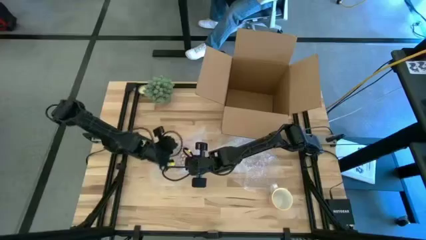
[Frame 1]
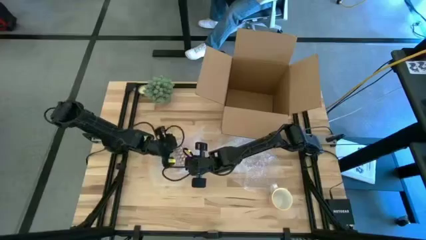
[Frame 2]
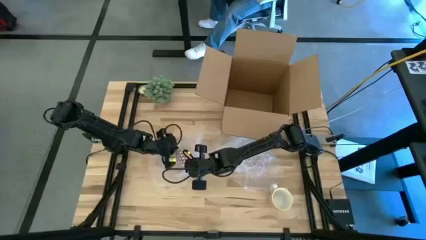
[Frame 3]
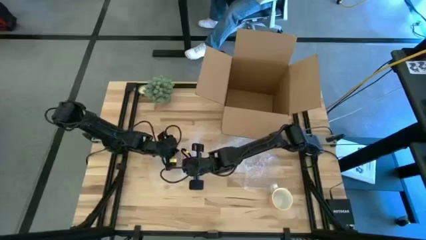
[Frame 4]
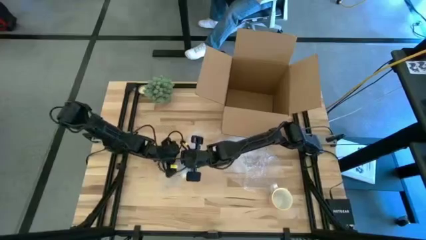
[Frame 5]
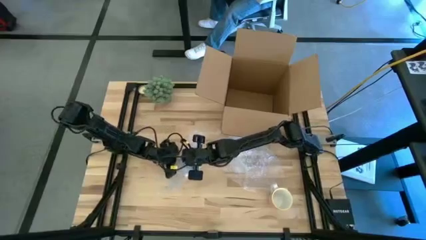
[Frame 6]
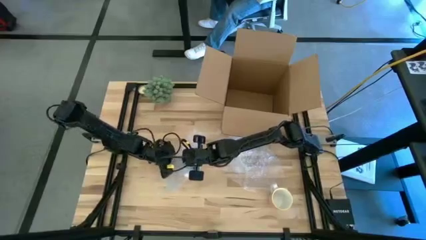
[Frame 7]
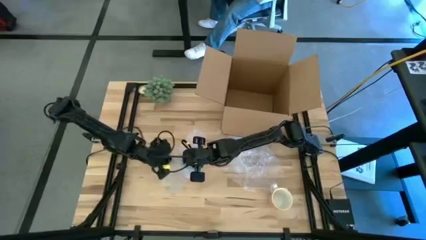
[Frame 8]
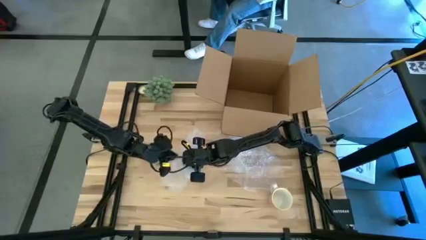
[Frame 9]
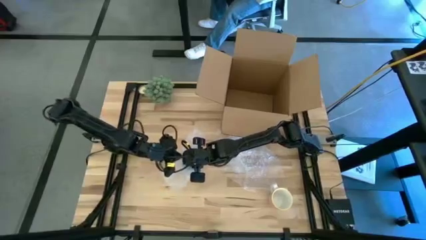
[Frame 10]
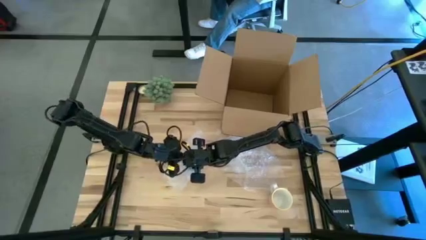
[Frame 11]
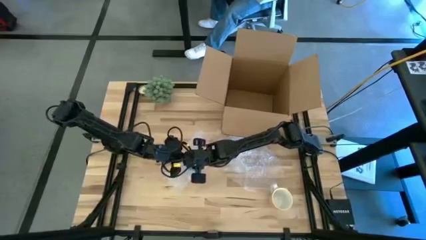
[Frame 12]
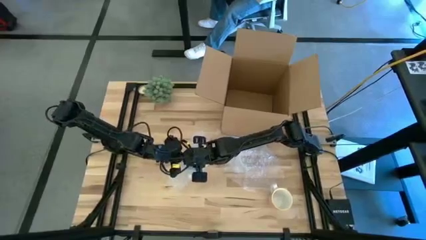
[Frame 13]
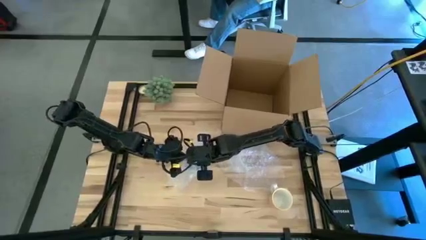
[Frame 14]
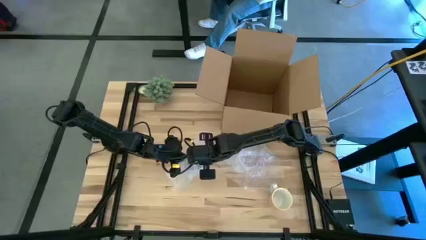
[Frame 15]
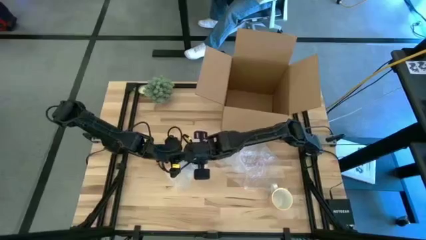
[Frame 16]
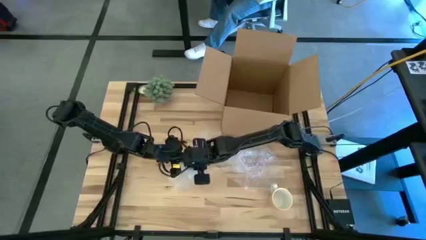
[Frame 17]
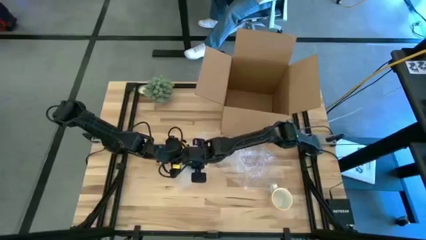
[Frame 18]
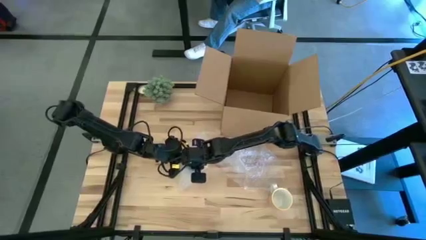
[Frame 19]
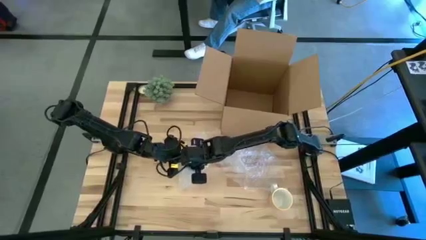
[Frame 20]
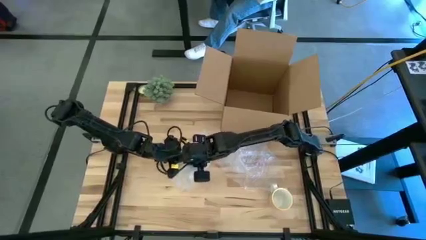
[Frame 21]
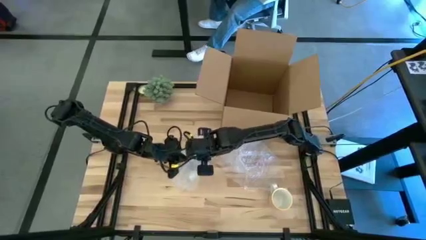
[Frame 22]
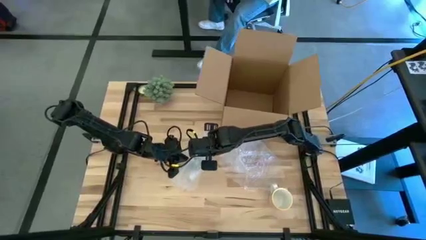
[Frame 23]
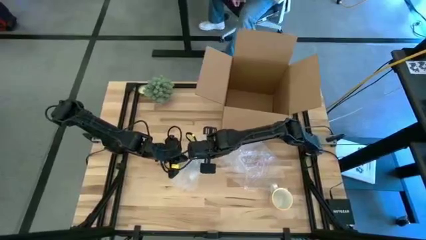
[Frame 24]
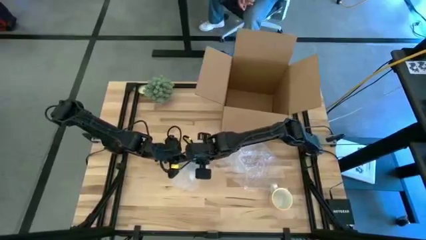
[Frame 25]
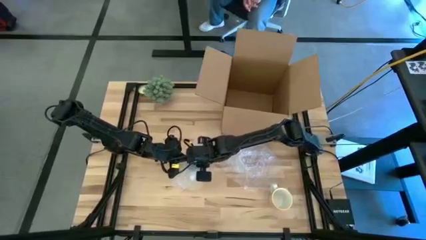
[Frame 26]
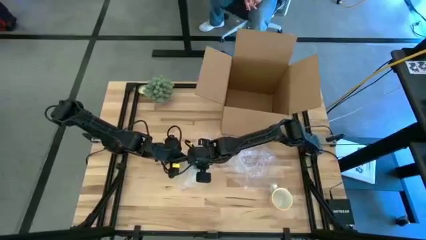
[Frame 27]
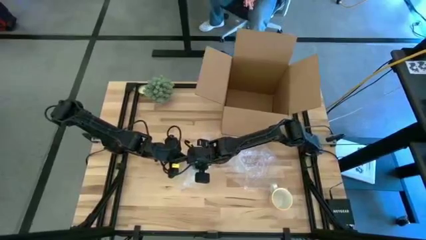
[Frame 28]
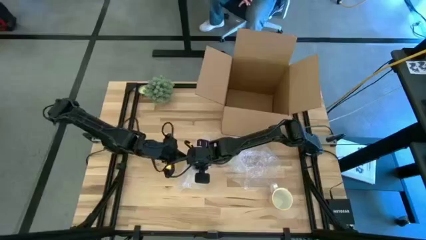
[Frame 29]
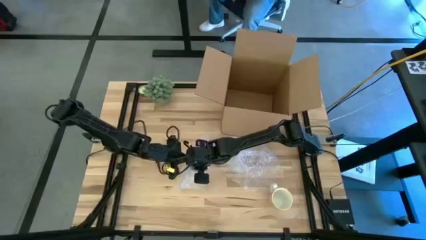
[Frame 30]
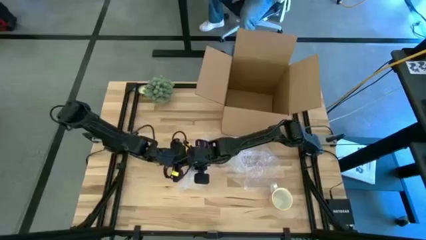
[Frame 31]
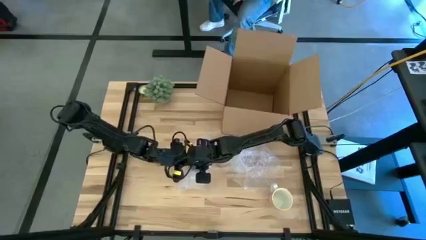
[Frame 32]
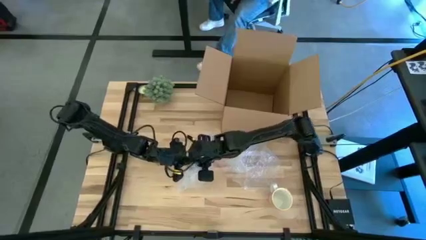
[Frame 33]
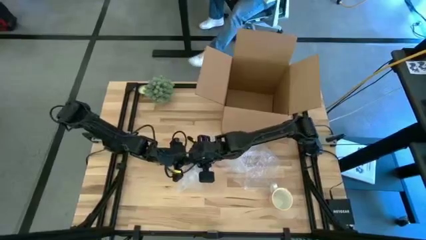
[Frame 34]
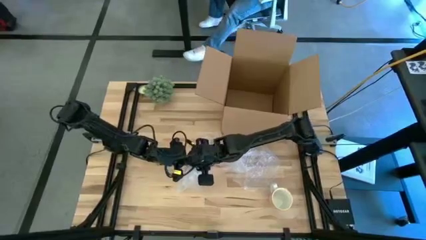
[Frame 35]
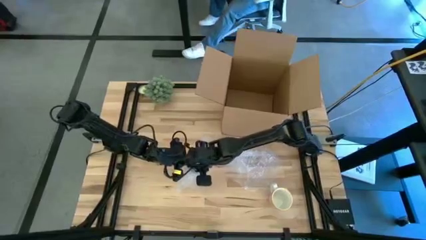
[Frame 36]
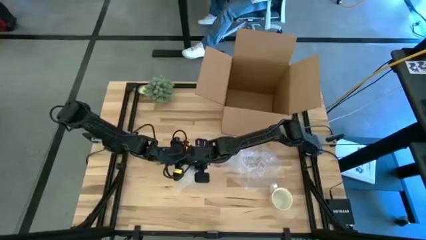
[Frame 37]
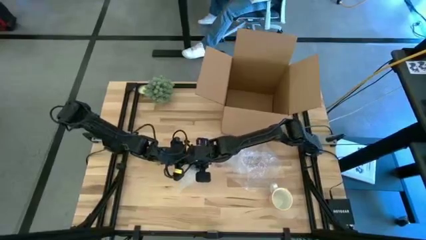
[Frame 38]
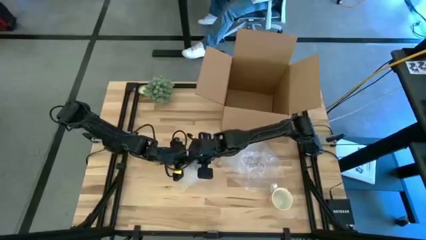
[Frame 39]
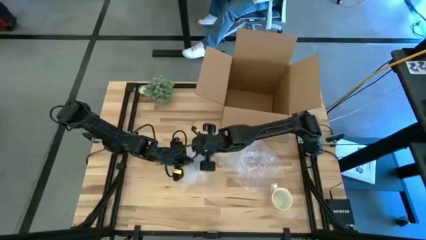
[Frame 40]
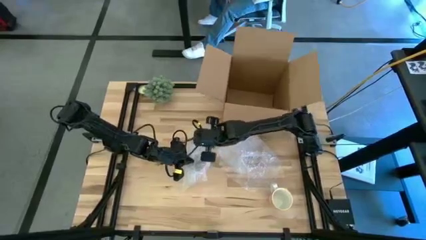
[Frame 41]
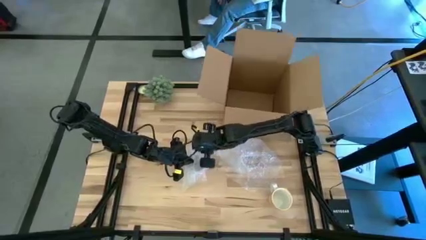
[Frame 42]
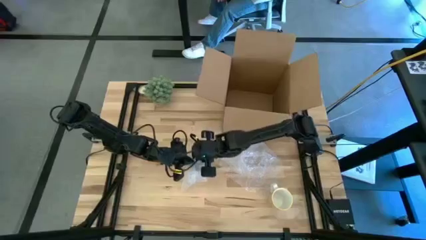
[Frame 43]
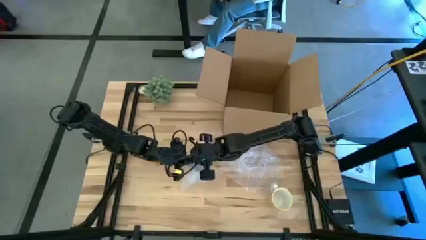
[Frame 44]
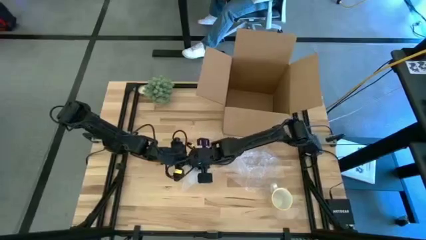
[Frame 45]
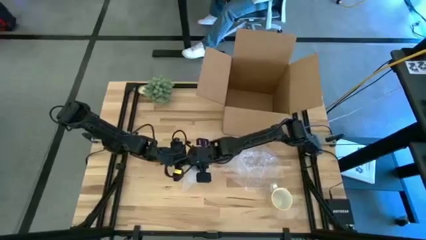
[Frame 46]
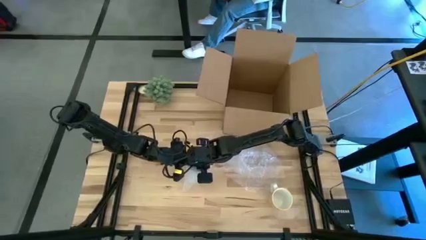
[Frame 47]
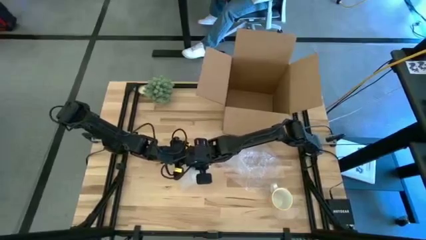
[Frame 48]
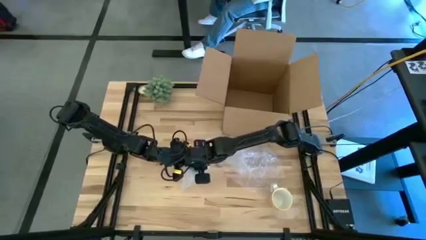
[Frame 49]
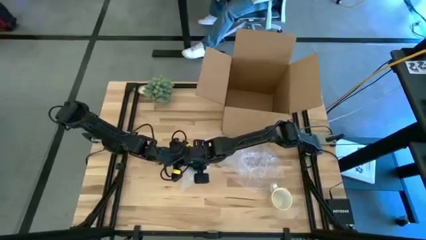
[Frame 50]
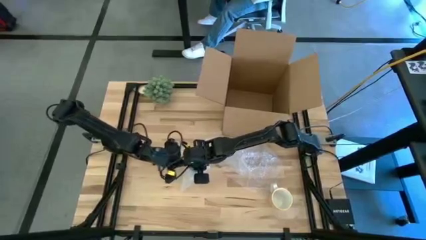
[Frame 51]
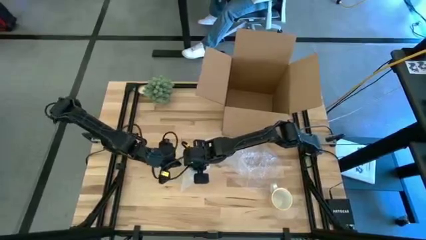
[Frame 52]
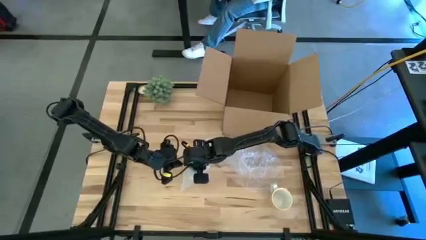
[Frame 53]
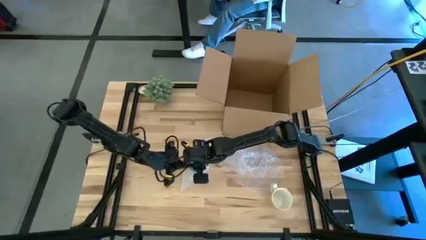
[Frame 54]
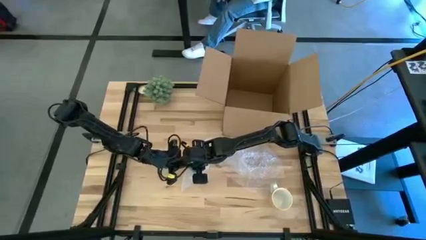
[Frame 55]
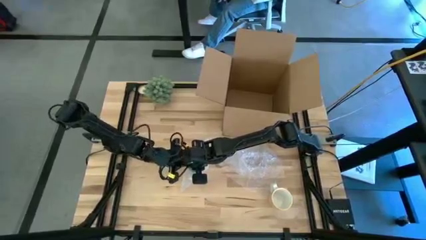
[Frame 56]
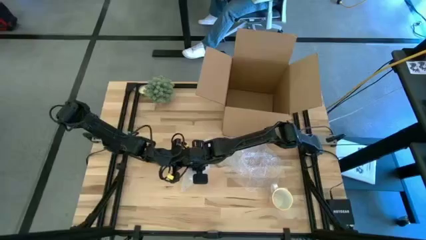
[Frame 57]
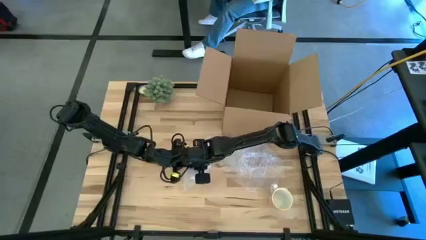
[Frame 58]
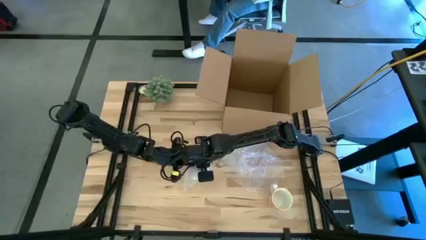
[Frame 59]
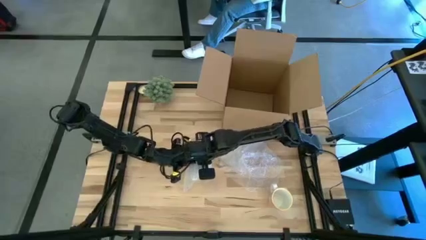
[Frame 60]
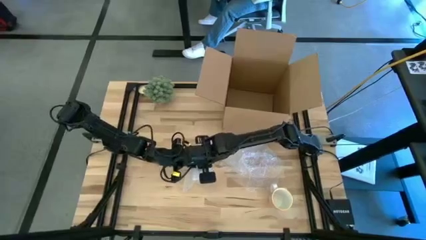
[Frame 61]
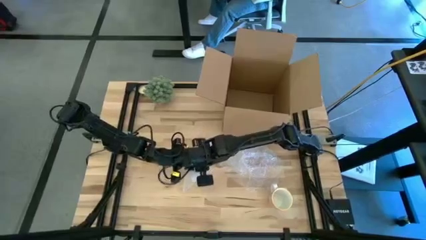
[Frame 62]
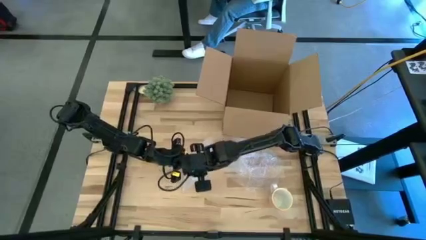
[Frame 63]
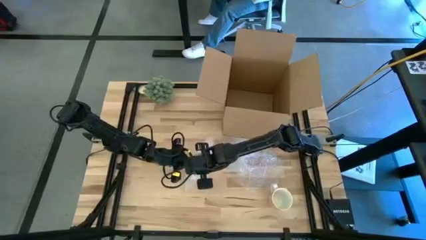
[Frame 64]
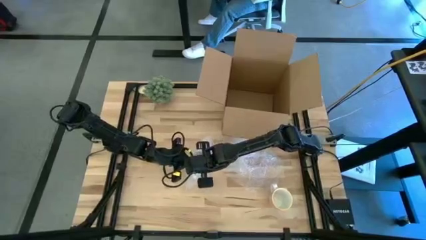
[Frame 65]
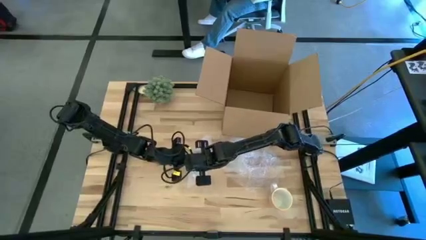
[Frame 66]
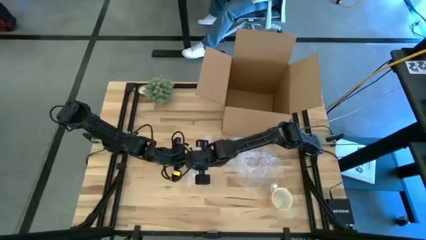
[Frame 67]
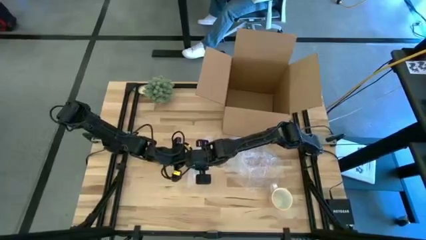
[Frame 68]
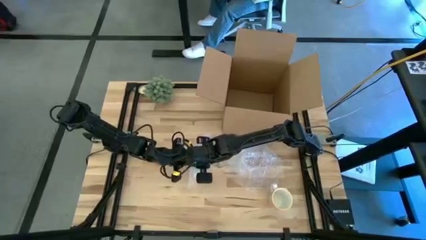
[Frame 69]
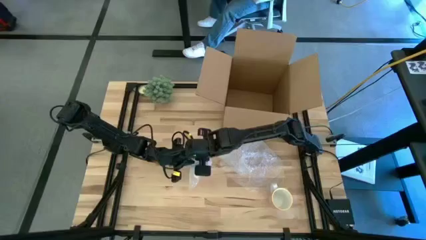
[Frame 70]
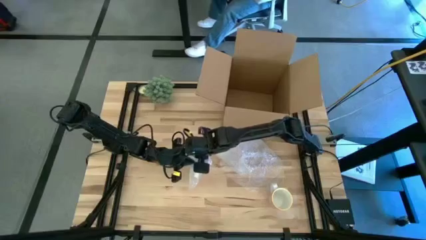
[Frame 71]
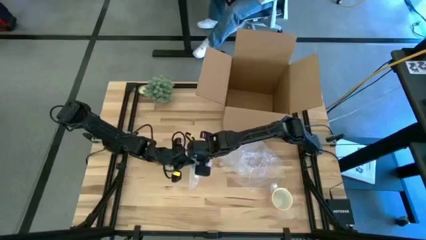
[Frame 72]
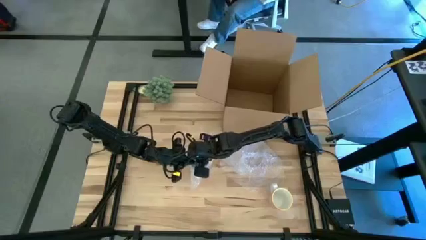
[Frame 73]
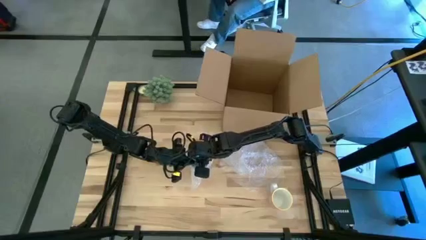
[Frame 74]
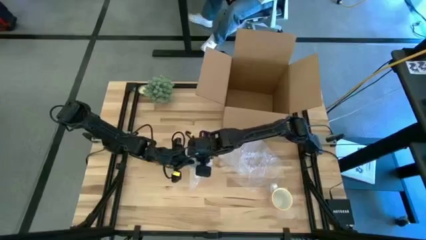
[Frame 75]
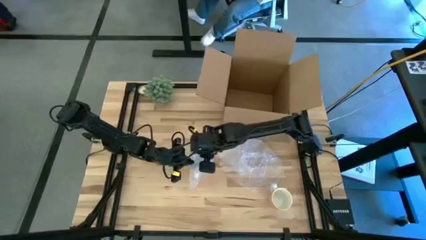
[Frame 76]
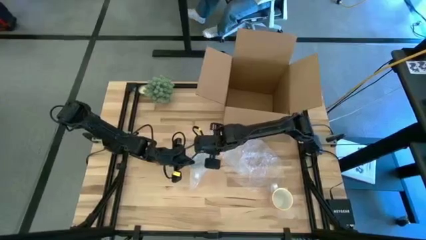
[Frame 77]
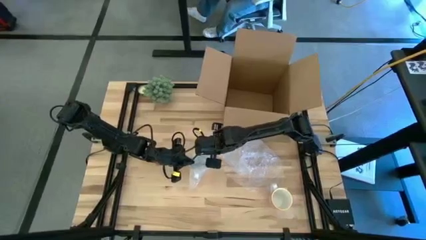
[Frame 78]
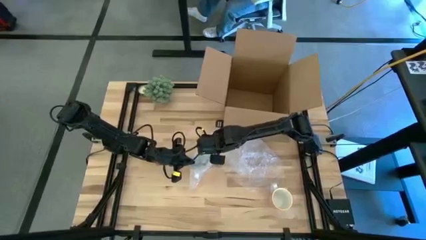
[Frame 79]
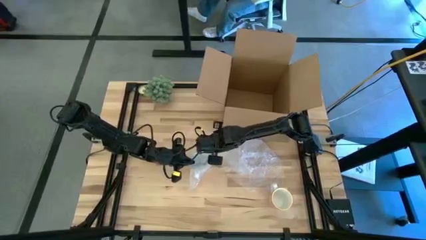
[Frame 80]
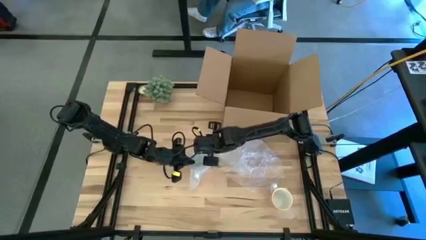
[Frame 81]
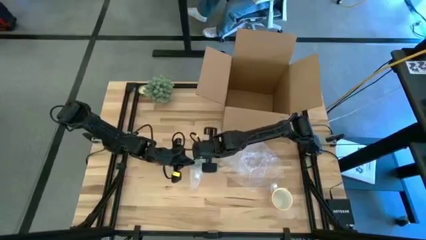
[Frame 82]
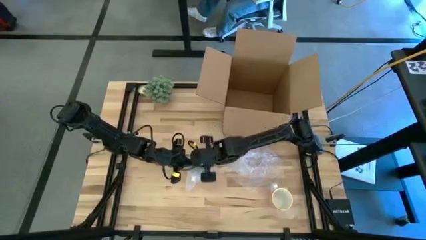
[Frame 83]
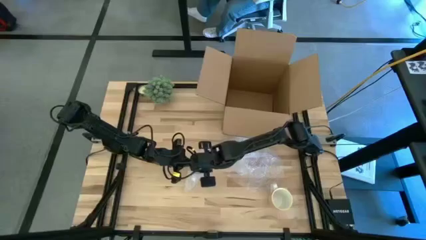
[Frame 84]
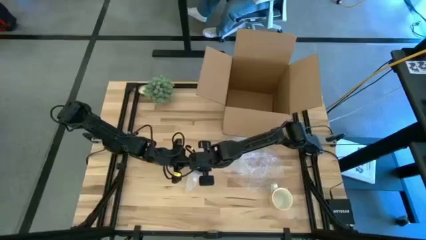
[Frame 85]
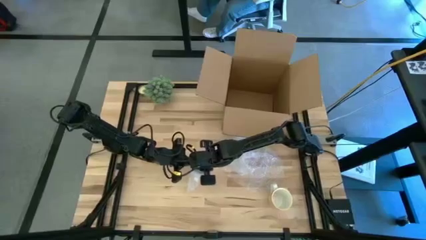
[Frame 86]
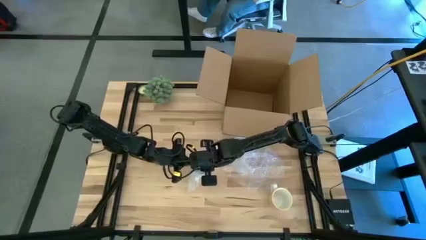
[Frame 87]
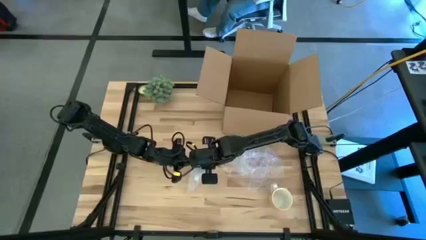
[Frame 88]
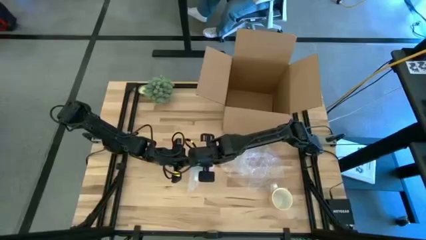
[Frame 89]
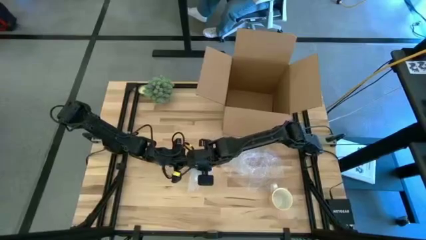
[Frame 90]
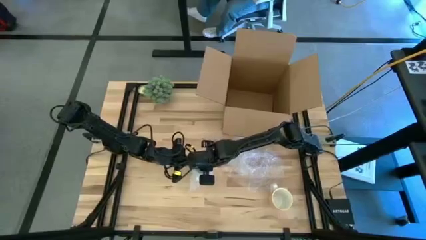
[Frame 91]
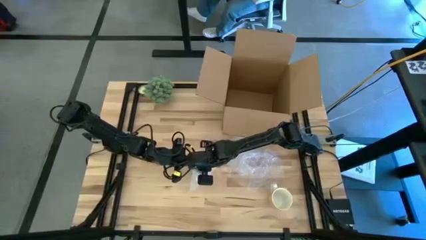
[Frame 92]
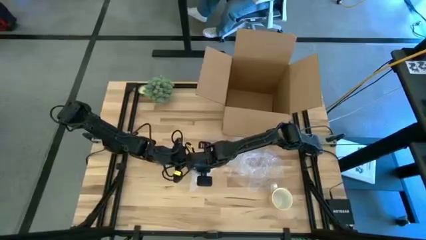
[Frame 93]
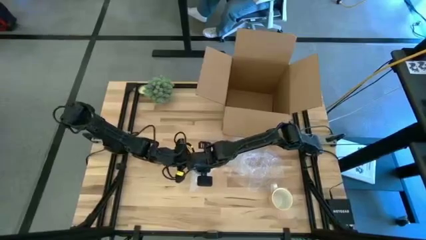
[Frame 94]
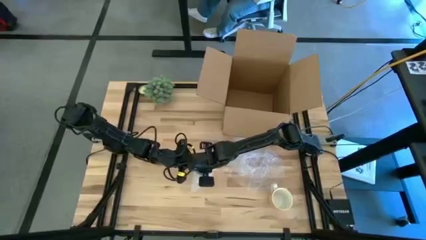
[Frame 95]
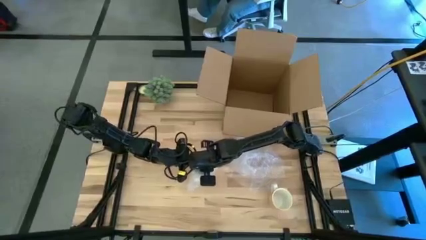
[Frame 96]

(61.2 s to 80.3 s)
Task: wrap mug
Wrap the red patterned mug with the bubble wrap
